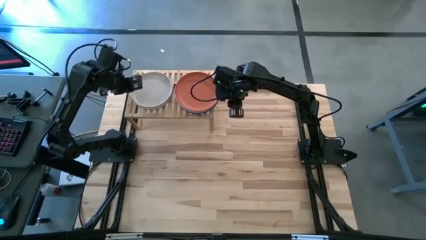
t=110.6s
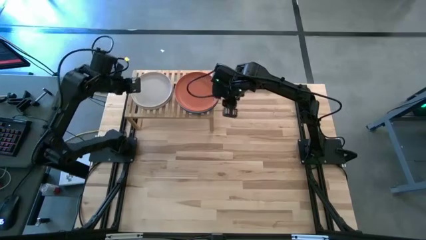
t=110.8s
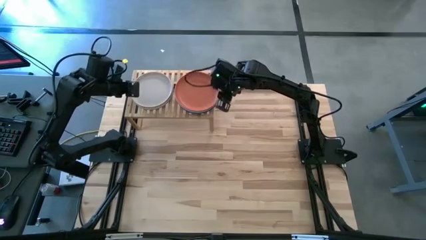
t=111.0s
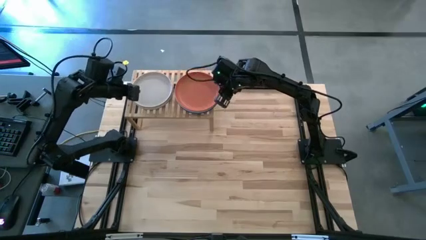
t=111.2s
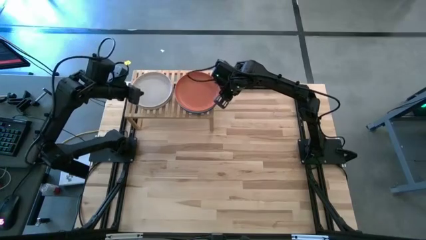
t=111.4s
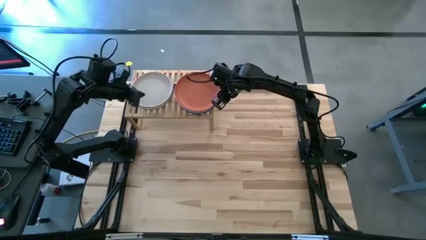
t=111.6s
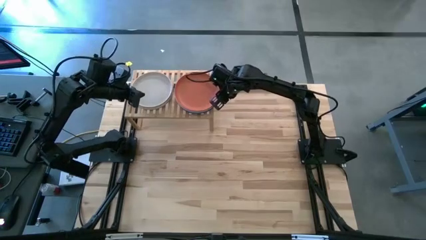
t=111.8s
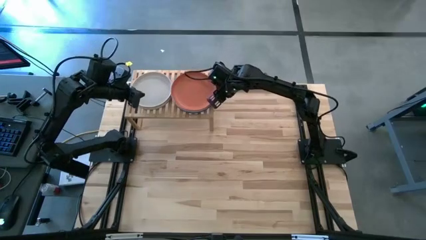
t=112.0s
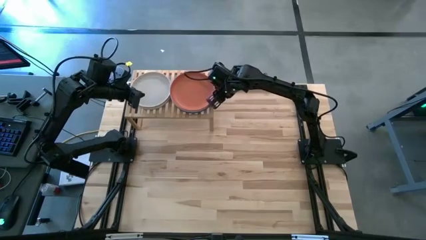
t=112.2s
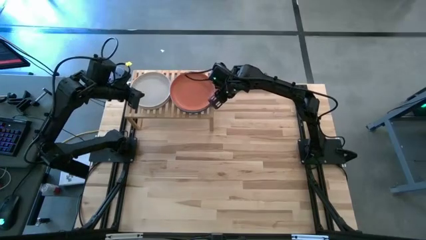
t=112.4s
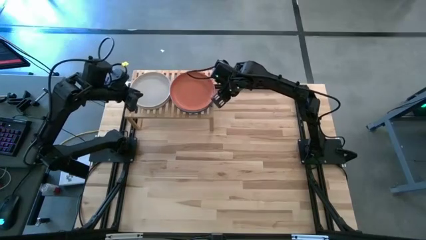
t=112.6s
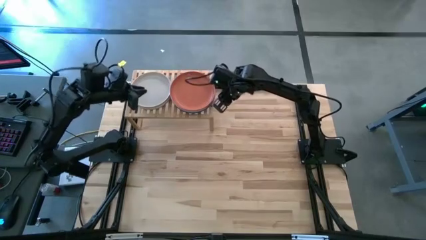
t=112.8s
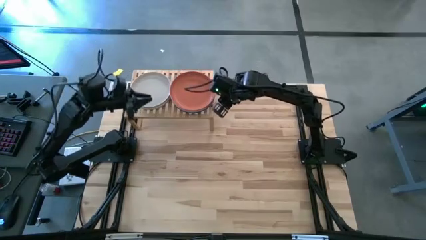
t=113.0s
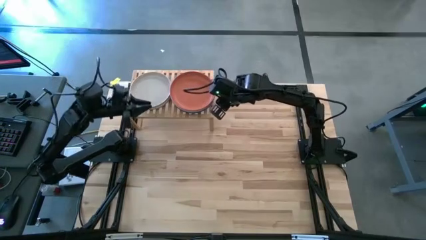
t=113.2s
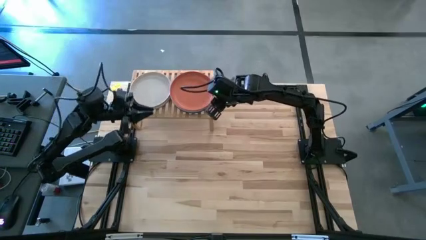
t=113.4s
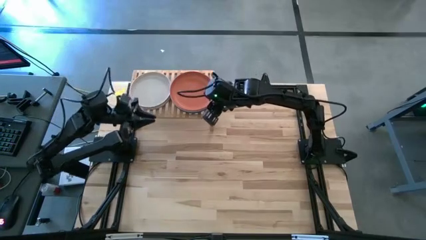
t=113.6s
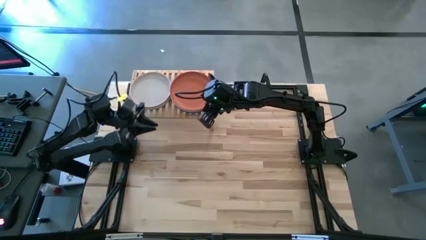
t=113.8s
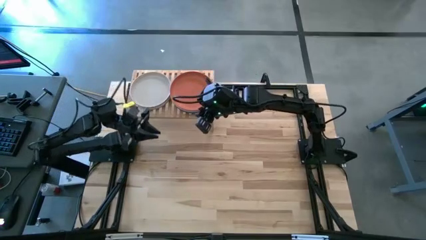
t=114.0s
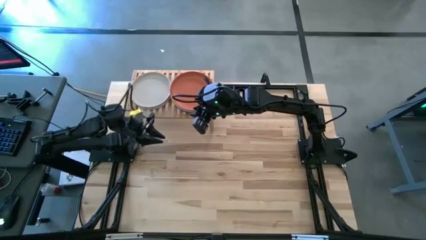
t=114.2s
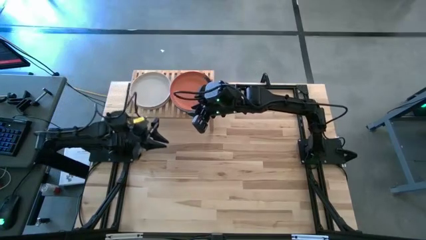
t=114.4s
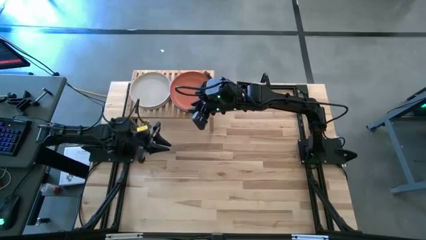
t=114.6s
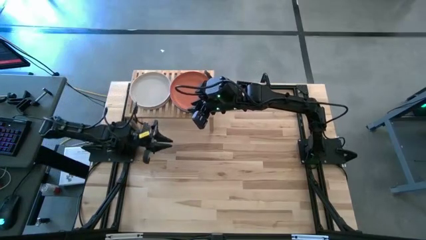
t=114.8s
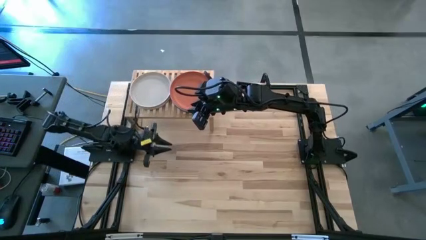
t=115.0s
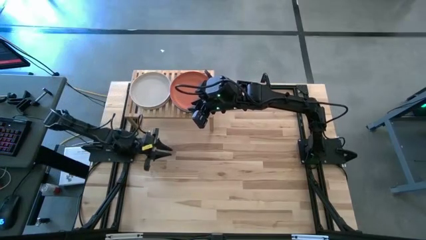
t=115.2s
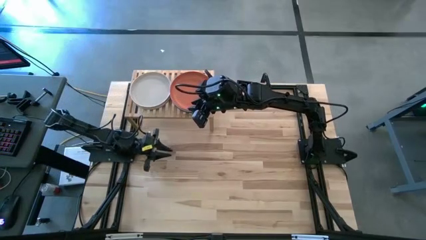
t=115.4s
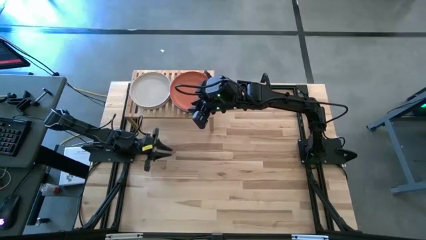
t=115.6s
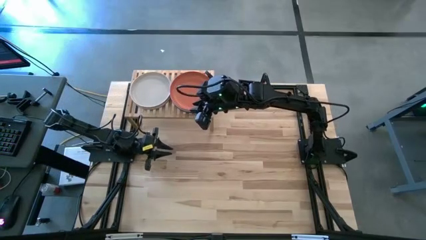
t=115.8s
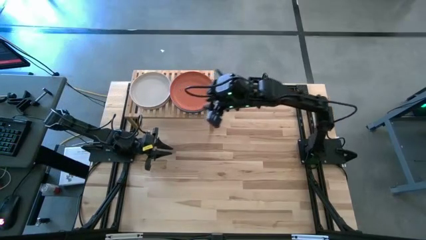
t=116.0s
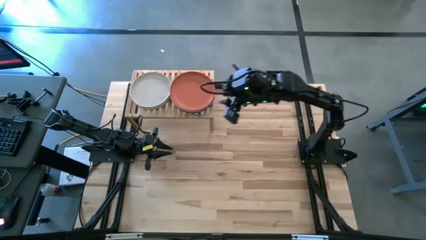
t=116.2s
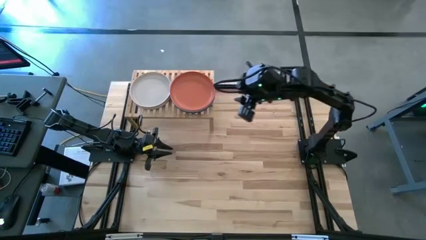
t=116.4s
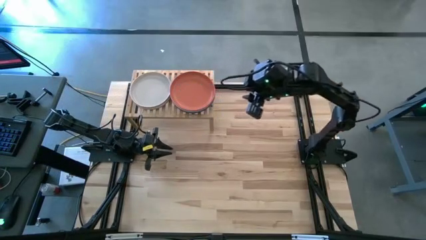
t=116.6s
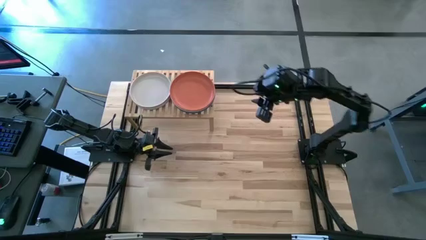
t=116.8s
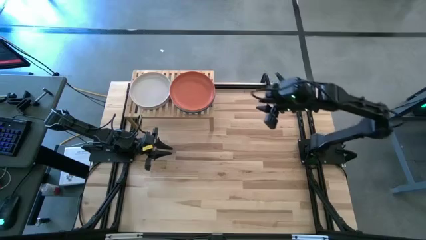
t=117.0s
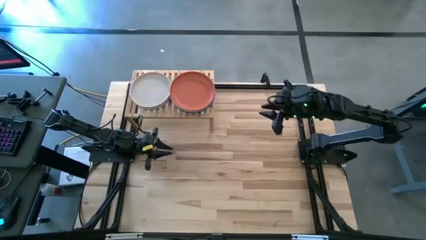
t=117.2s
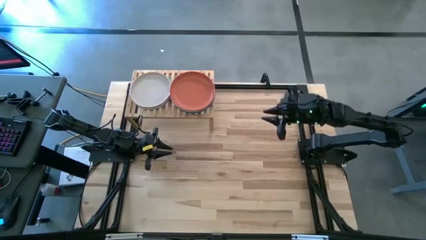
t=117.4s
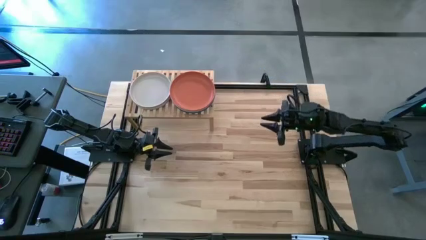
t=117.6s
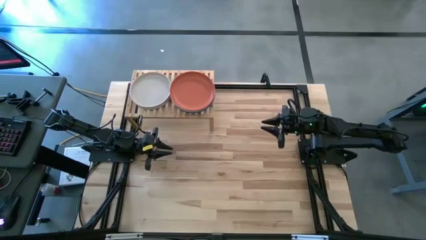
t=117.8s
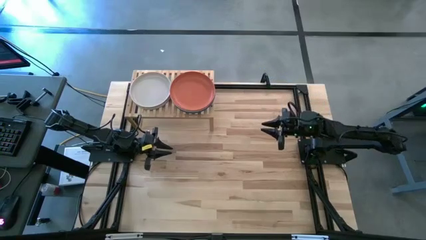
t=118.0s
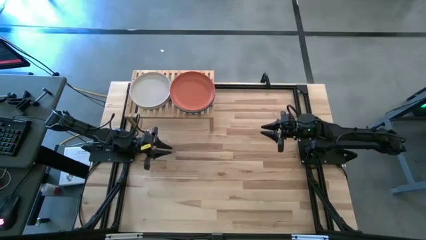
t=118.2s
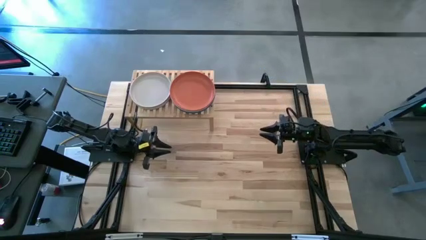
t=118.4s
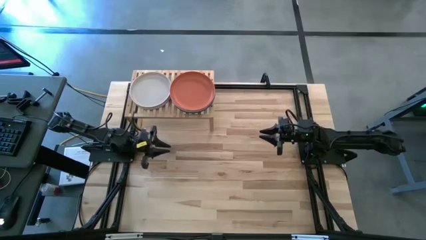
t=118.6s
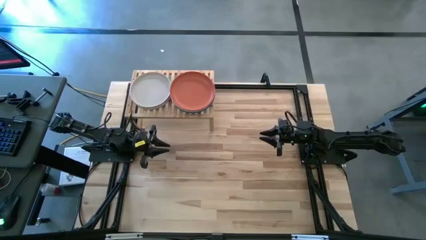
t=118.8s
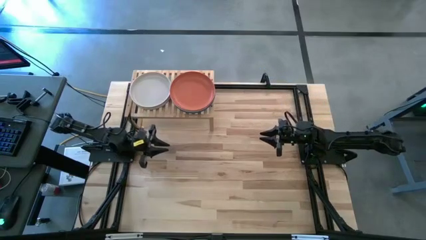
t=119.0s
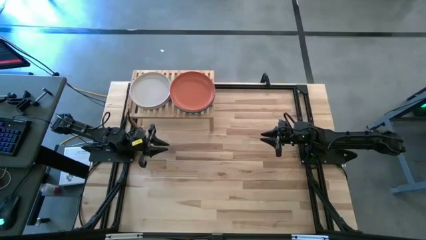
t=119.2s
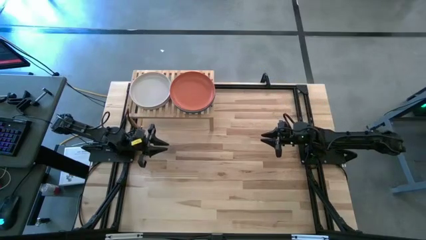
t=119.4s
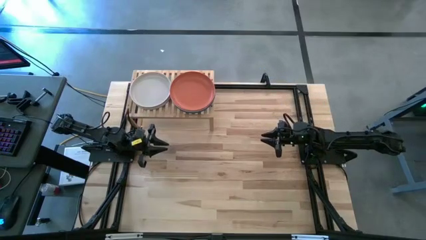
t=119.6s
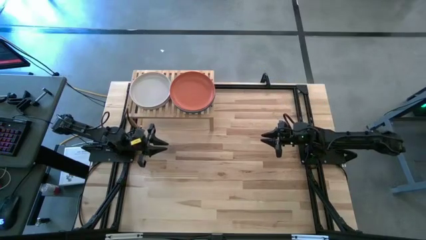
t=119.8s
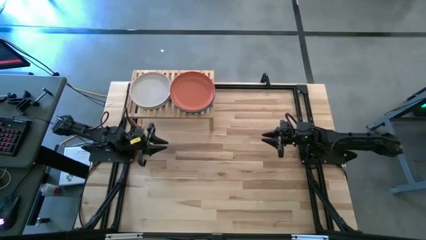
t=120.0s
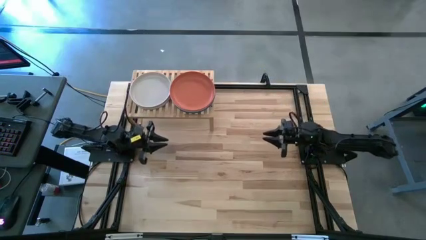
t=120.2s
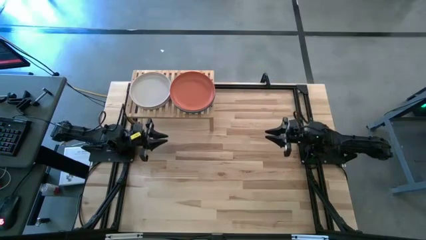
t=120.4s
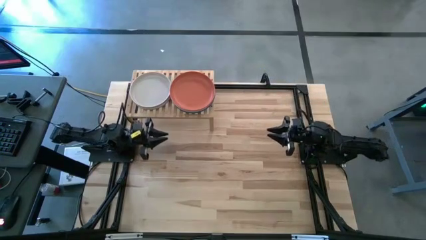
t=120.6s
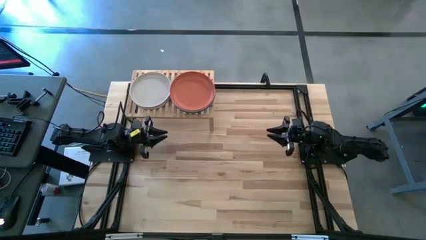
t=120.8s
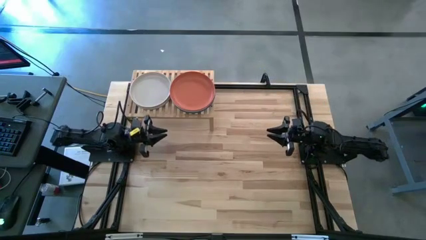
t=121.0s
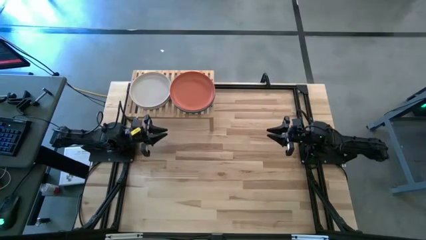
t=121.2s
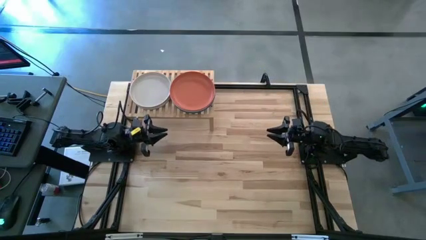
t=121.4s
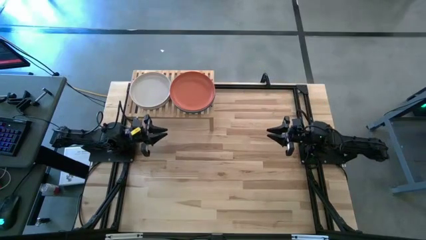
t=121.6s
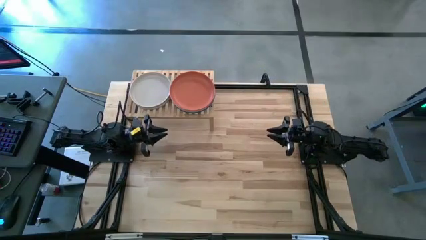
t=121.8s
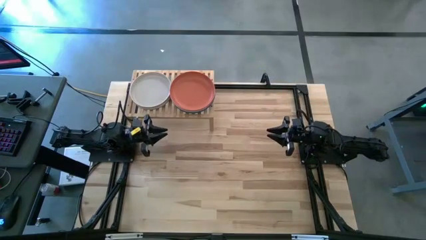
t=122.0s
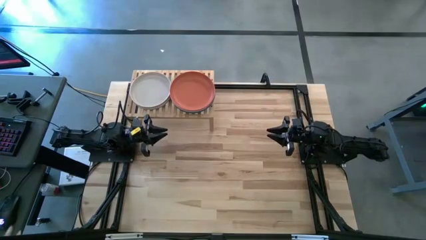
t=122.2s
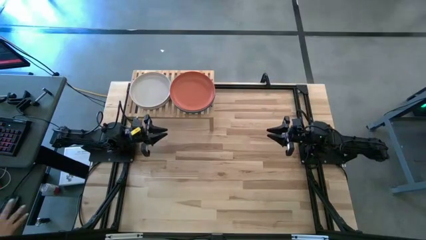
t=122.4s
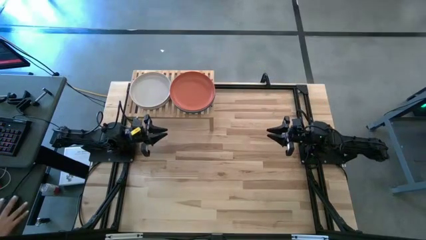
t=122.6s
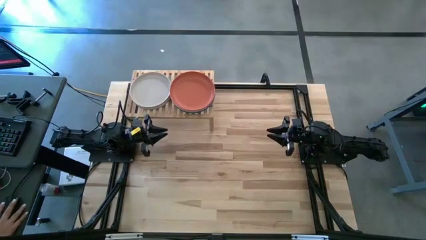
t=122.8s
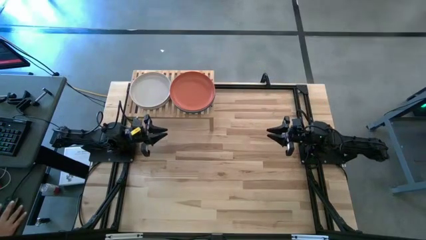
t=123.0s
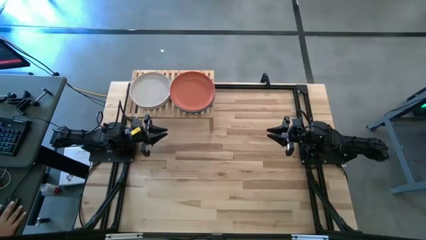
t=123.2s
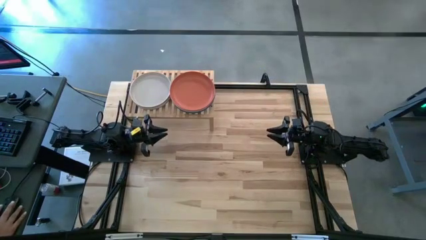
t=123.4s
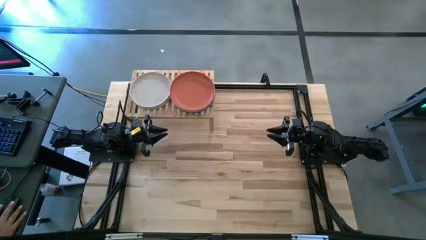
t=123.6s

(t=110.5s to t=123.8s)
Task: Place and stack plates onto a shelf
Return to Home Position
